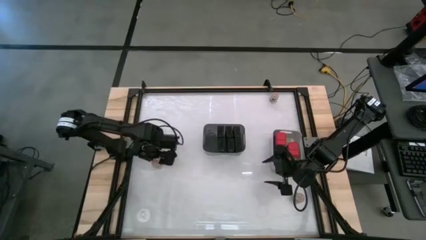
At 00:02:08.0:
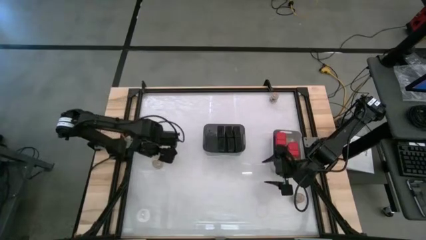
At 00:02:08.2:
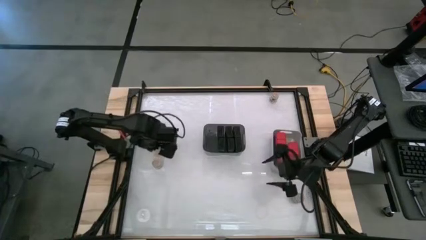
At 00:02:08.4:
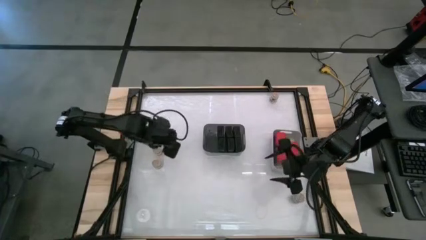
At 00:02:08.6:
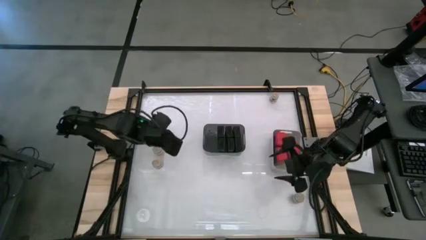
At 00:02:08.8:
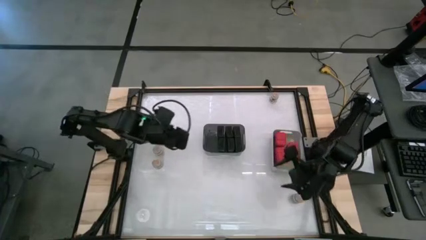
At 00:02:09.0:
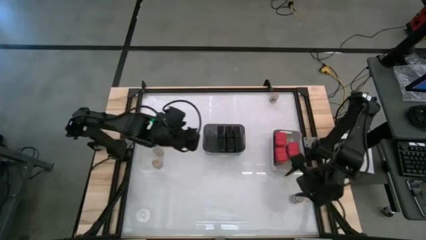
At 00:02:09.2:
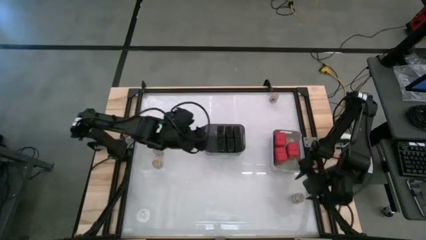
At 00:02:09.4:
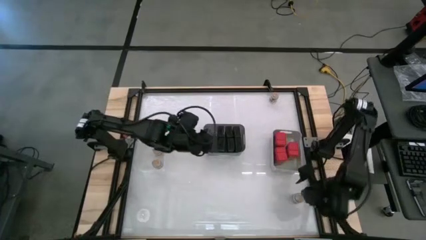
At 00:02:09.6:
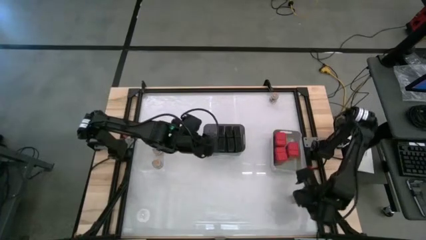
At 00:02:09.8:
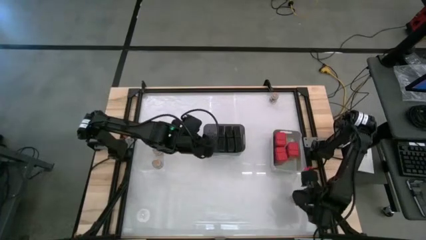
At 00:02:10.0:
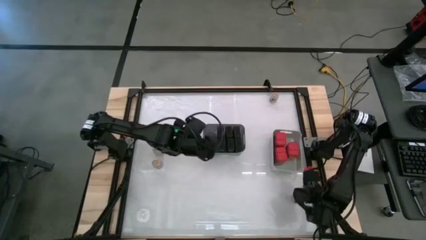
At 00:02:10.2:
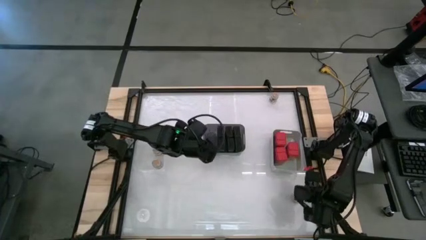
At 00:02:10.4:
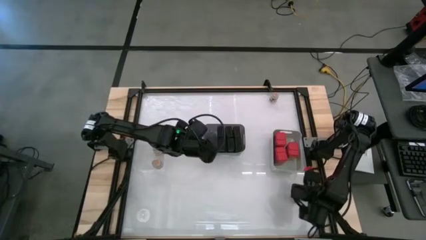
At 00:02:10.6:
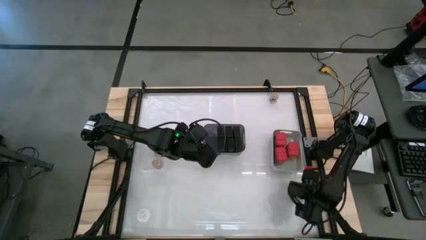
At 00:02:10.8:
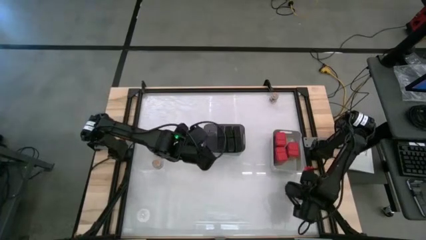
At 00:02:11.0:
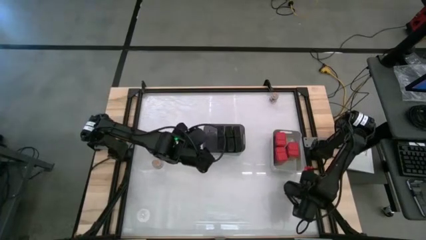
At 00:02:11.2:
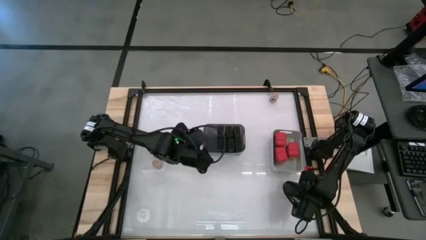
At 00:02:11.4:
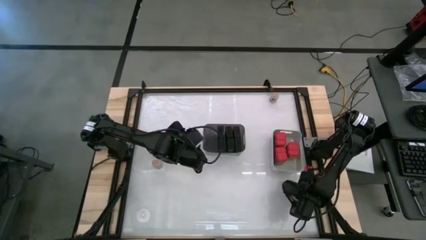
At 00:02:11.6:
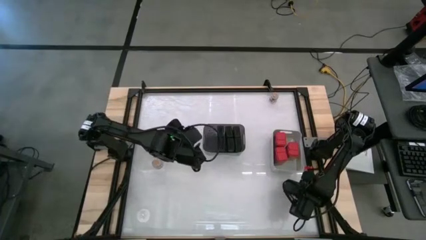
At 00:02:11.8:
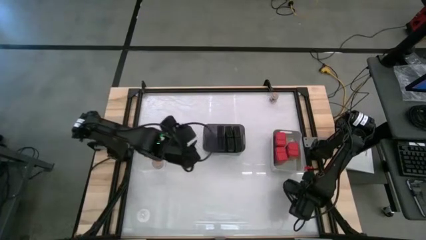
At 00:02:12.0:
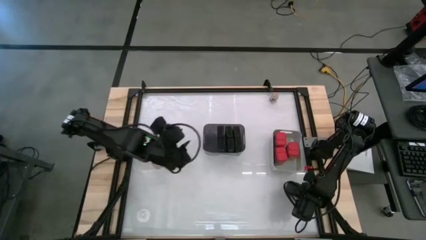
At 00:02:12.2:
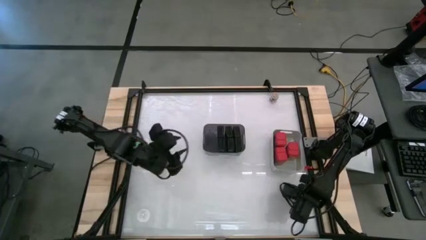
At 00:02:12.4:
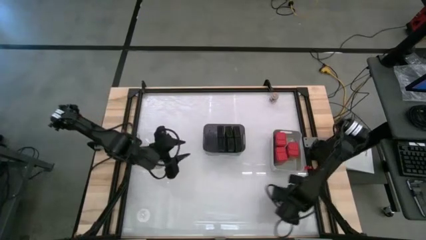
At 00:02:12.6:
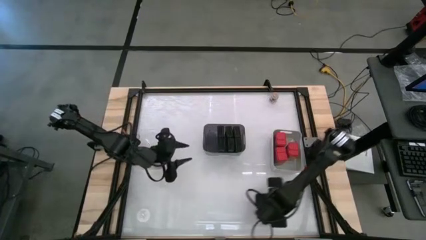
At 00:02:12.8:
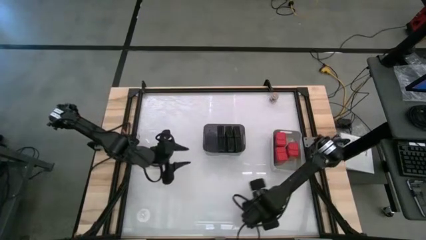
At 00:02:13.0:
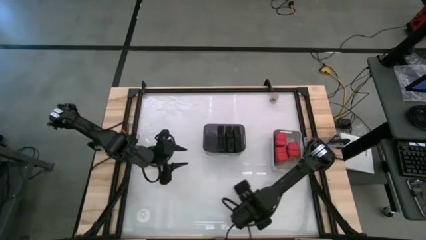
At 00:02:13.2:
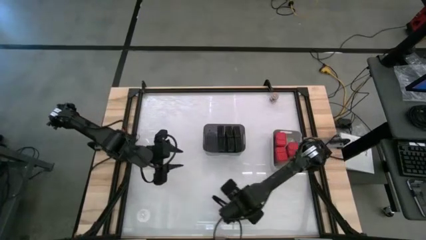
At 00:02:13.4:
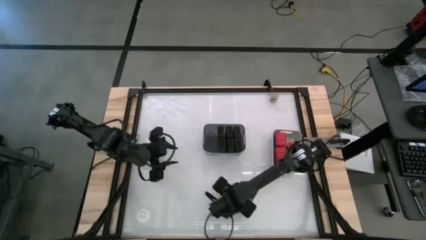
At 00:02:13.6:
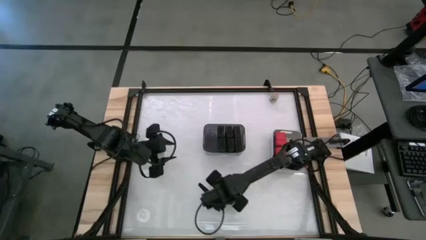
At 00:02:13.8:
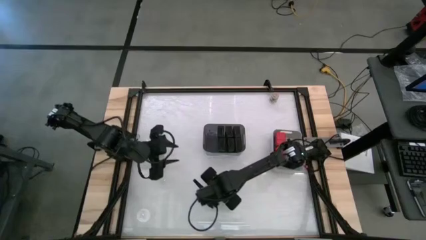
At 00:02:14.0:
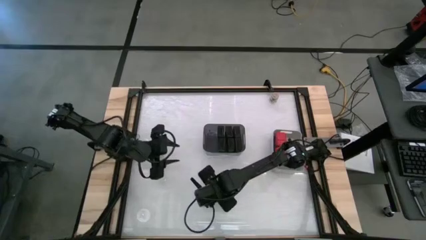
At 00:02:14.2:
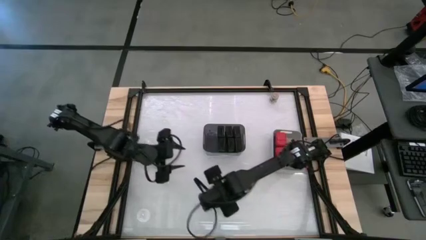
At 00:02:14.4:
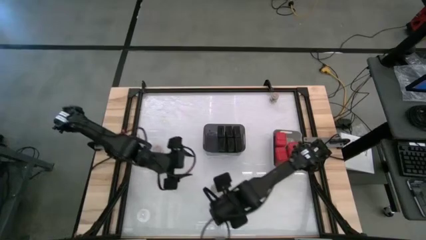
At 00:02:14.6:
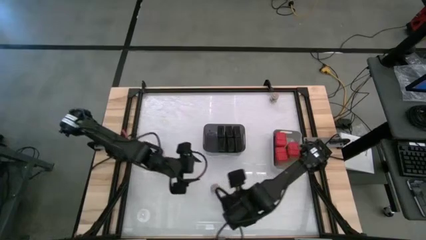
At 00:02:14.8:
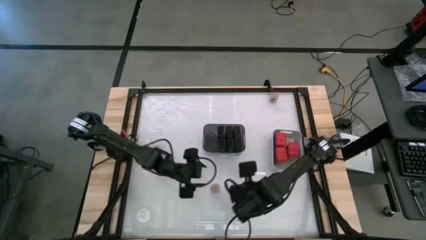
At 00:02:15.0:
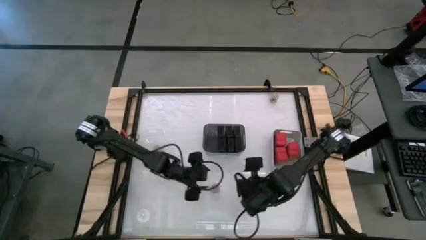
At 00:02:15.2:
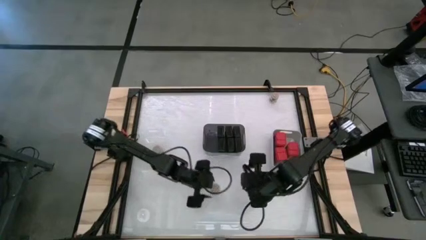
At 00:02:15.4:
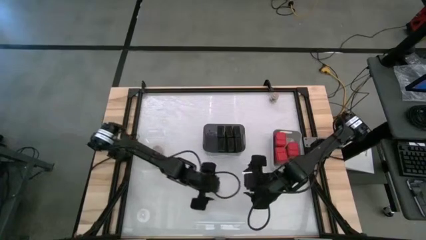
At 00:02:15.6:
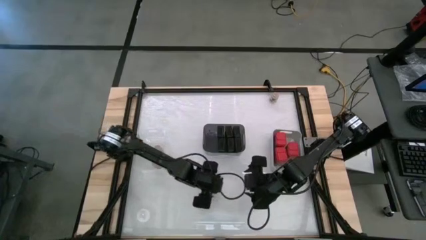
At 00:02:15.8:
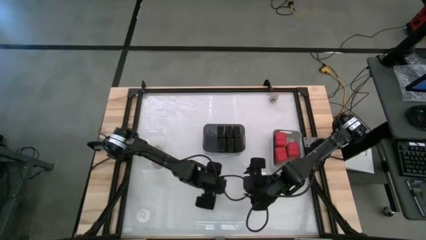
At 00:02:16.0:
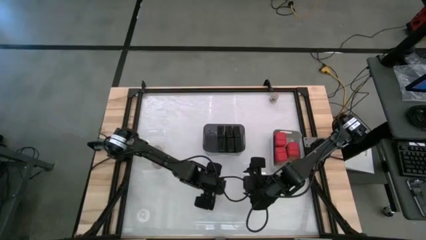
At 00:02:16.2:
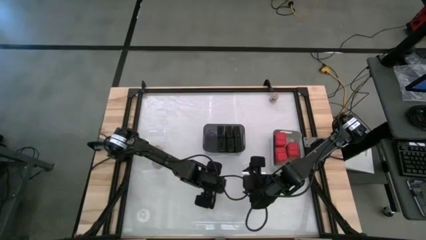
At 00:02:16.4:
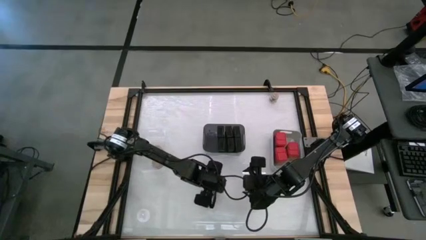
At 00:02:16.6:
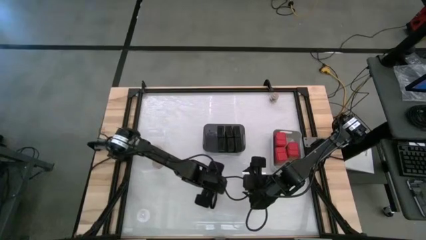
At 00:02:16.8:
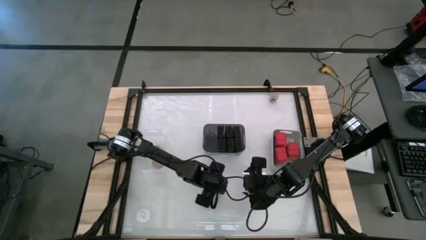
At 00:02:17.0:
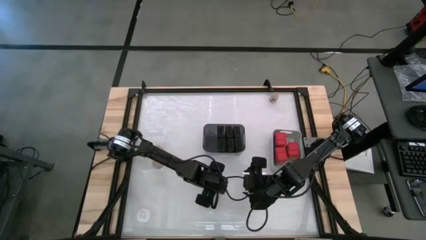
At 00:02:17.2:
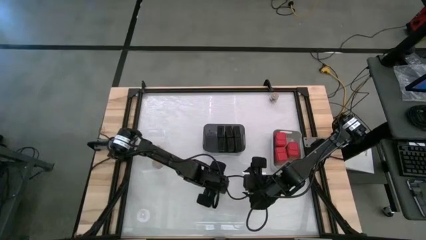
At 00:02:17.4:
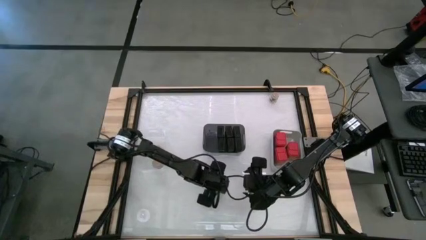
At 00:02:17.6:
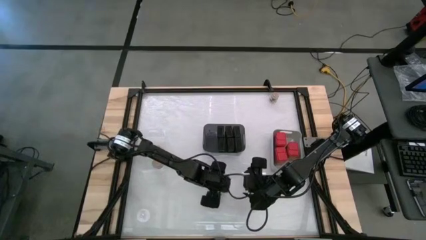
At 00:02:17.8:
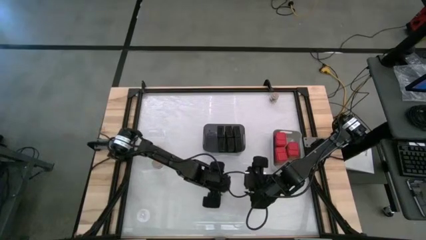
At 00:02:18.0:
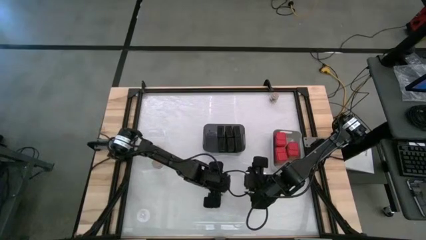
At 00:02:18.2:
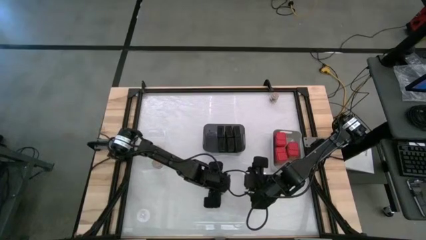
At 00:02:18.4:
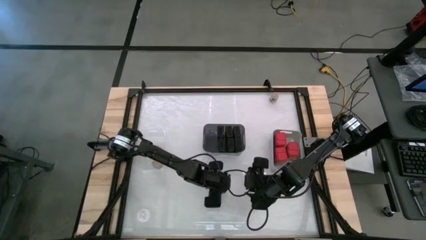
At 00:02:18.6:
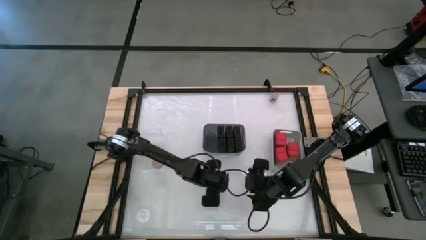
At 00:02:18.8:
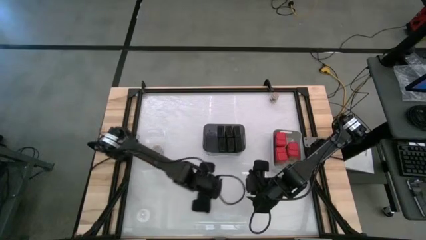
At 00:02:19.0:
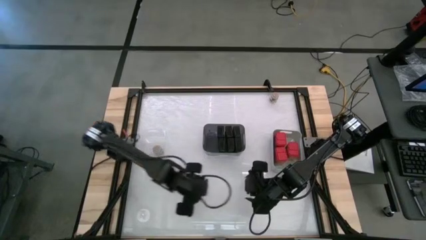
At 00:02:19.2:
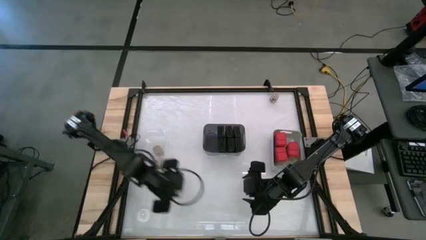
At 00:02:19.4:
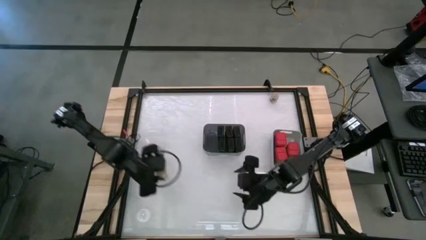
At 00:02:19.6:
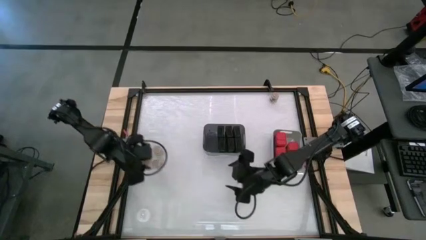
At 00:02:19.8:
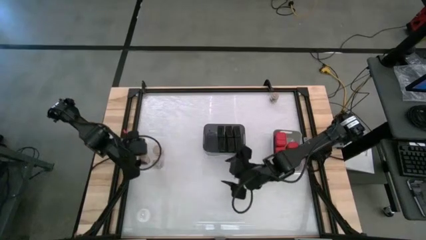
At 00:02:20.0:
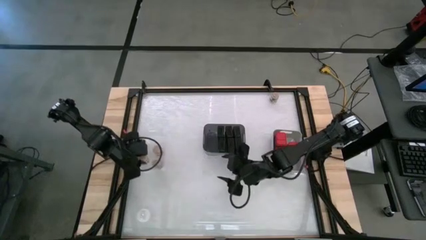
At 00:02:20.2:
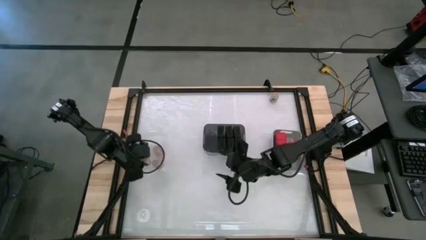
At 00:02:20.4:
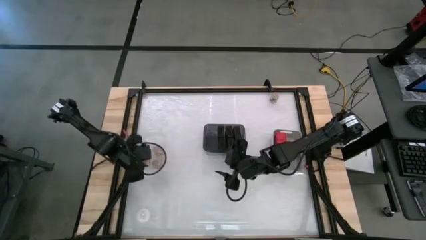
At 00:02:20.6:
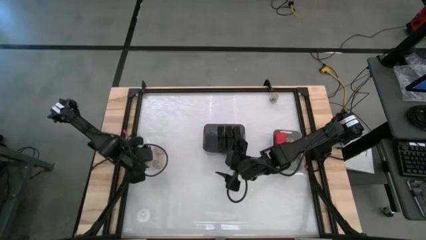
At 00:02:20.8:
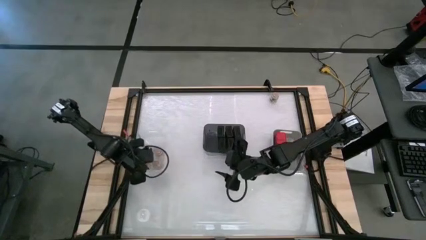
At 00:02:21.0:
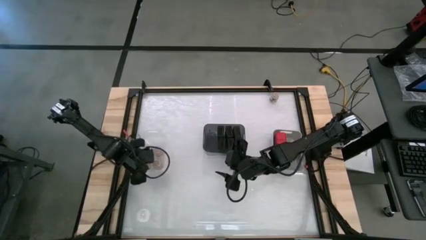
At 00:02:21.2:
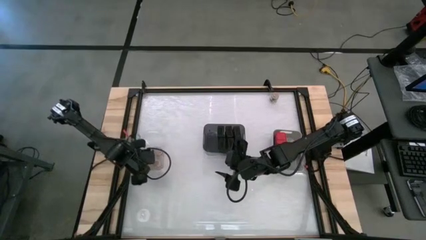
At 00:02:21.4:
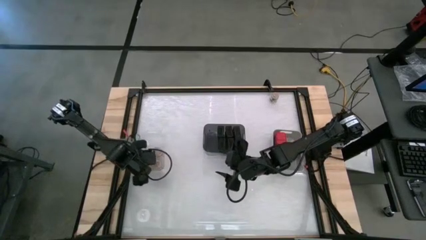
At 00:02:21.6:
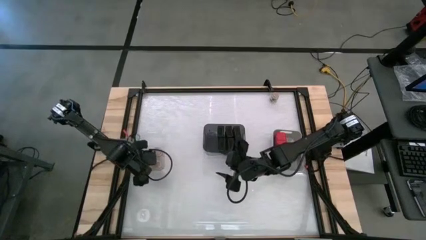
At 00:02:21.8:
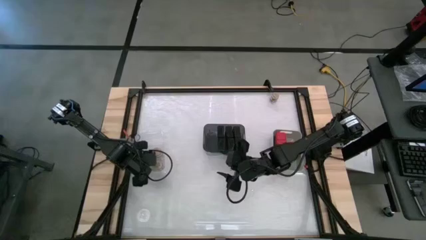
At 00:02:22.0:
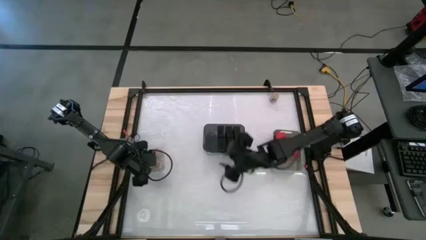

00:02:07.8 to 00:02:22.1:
Task: Sort spices by type
Put the brown spice bottle into the transparent bin
